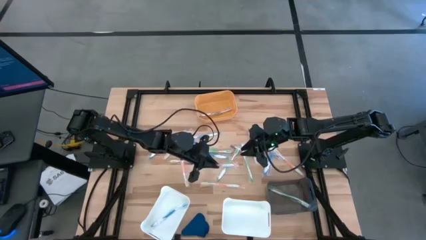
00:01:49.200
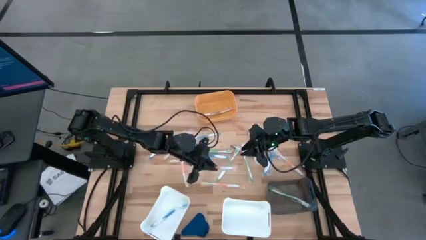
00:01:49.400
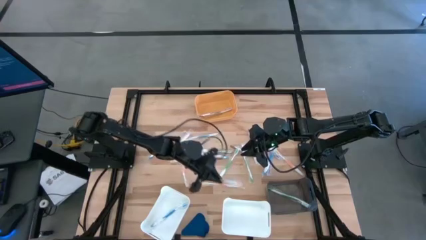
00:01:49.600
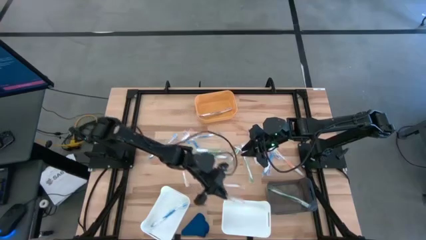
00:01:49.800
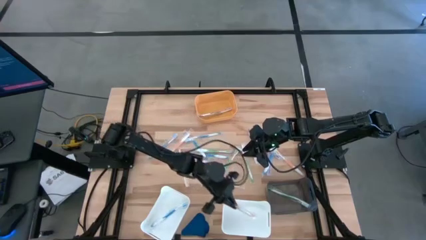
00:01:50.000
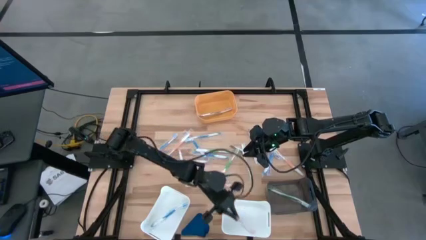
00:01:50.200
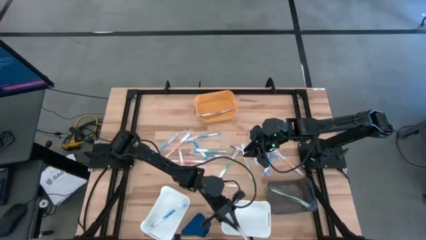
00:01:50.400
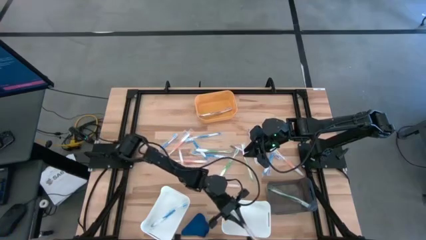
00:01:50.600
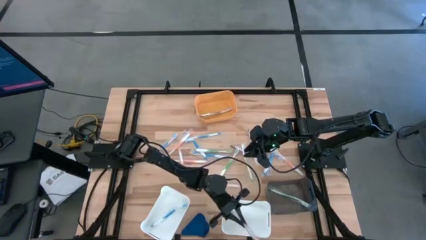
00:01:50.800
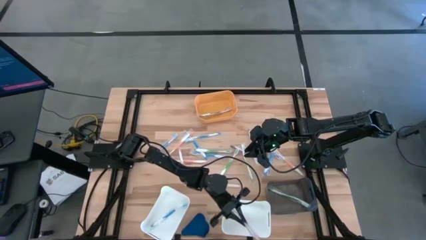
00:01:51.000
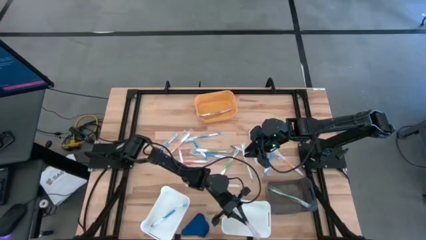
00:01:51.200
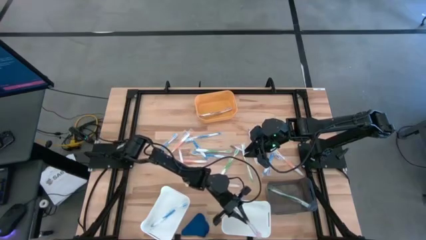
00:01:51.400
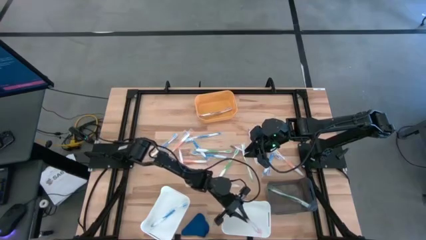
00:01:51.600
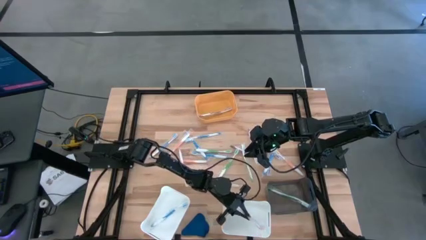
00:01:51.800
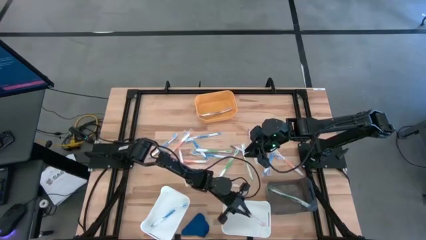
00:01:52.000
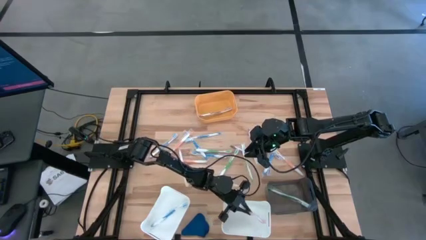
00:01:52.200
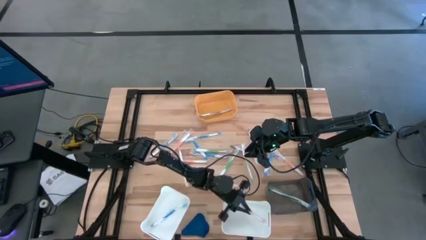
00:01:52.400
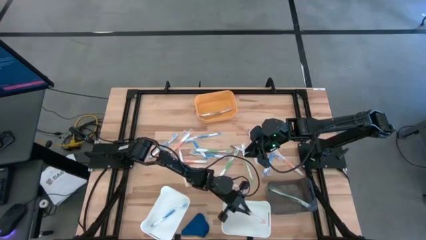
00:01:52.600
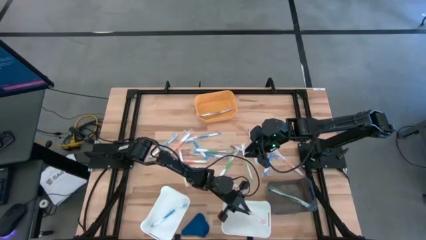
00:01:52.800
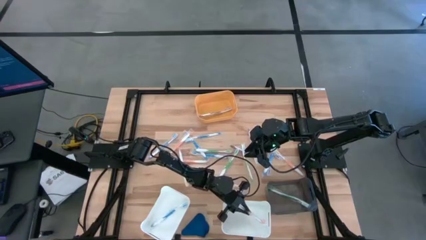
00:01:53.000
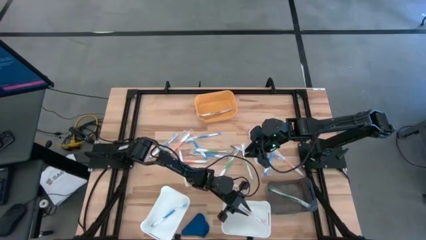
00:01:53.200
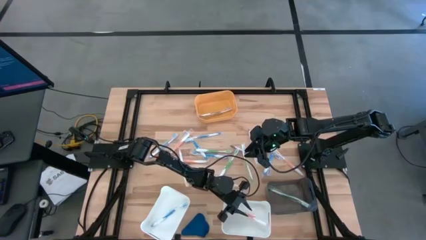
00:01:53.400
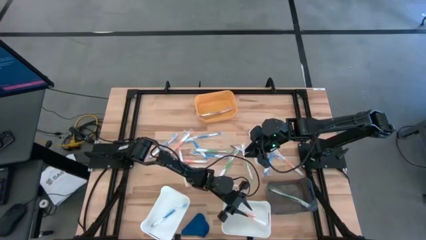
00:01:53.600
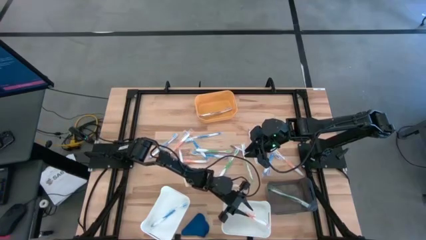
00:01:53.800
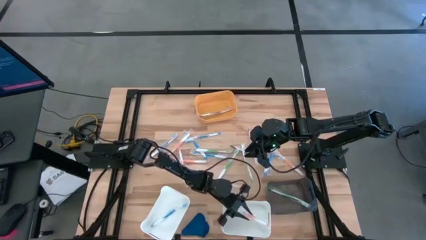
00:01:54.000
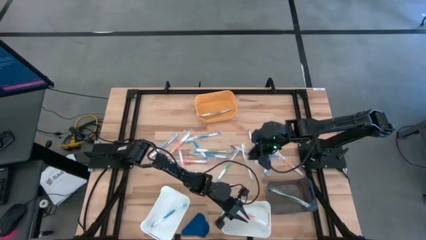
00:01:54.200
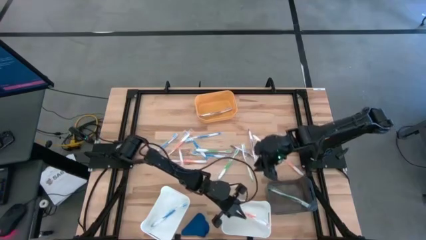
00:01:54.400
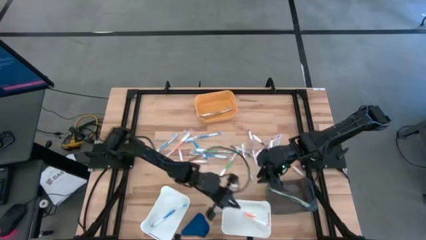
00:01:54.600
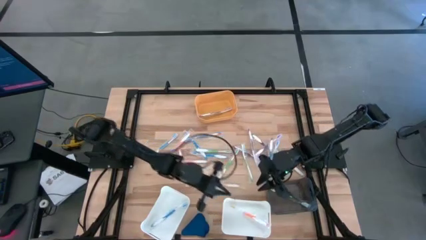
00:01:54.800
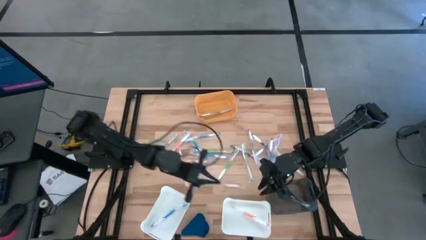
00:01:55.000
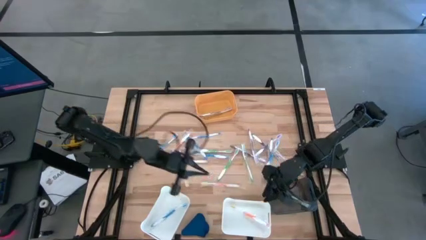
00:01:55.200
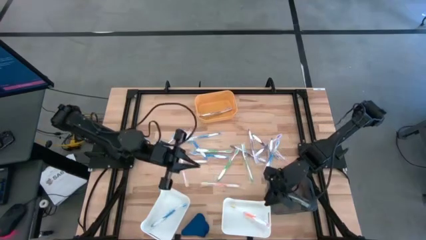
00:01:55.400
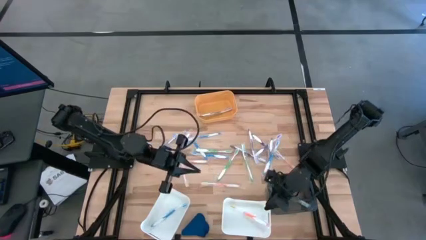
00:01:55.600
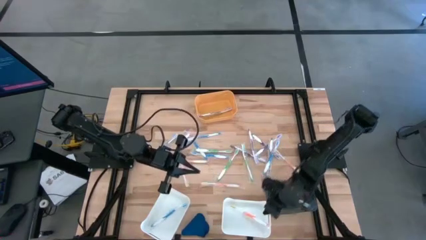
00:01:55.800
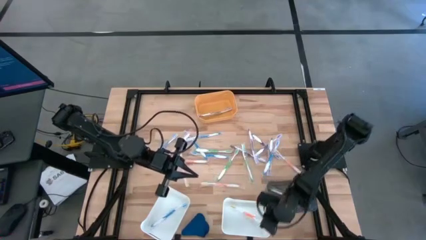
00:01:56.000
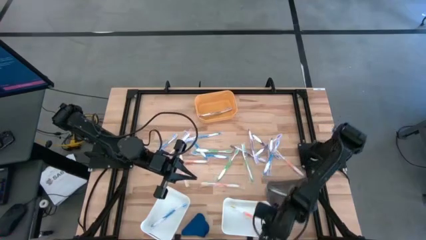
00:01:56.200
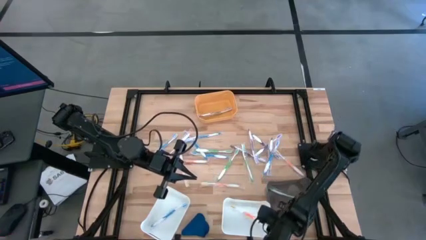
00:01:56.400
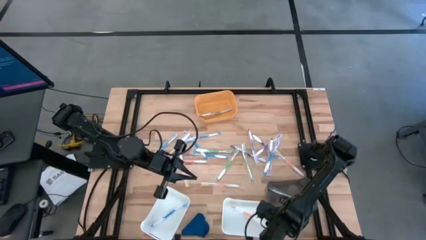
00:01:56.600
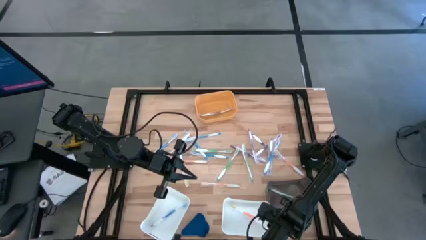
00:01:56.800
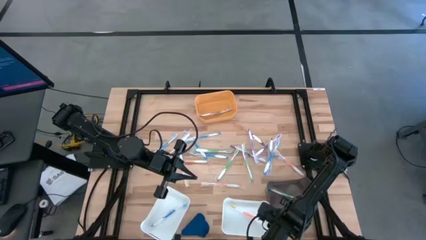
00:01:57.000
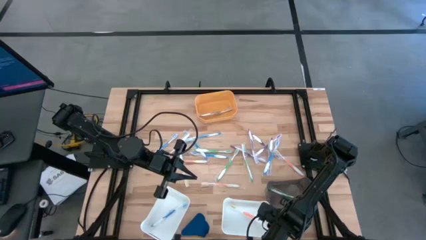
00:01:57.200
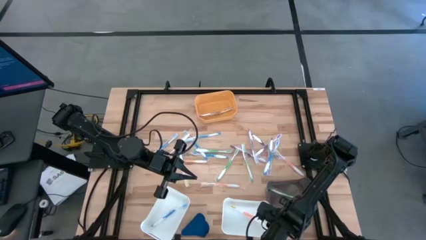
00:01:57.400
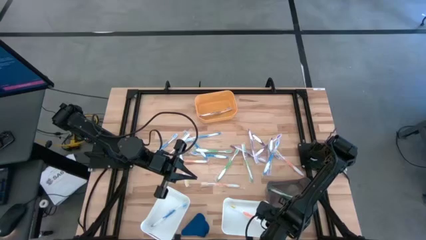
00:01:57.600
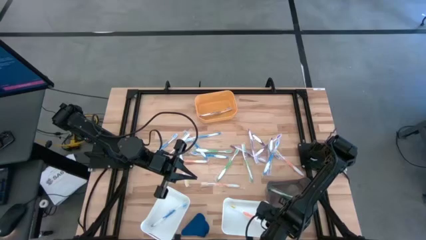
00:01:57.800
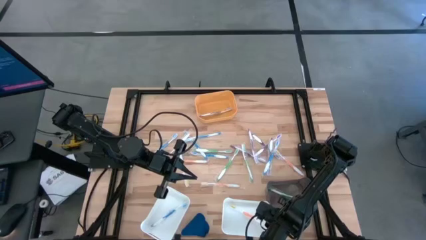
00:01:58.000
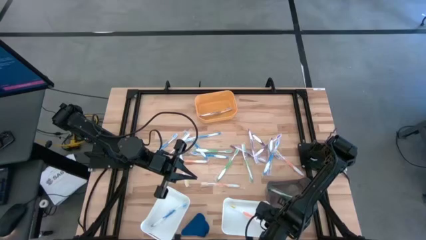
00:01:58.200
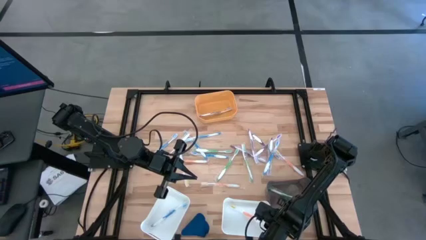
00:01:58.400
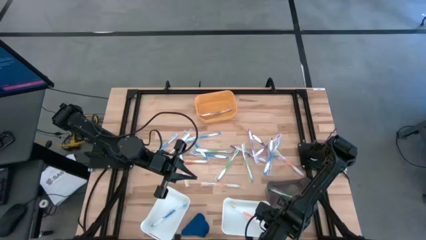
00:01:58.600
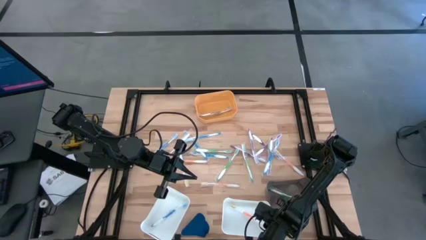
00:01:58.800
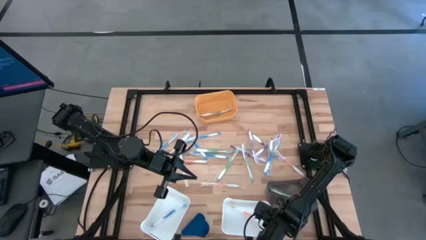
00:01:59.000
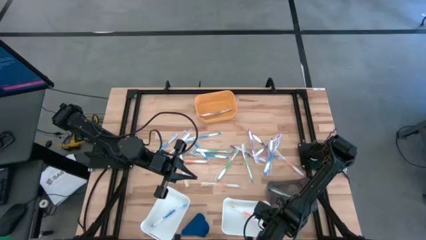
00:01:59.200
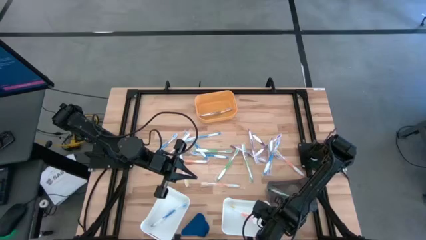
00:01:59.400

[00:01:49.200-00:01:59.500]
Task: Pick & Place Toothbrushes
Put the orange toothbrush into right white bin

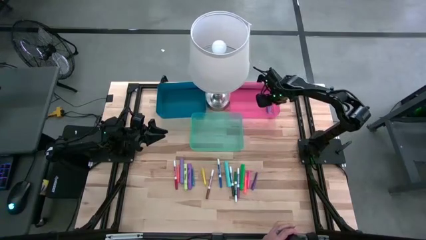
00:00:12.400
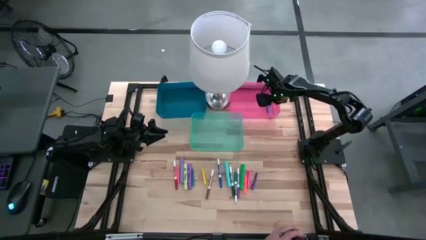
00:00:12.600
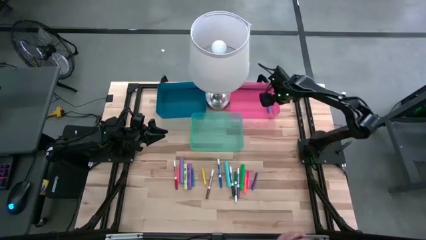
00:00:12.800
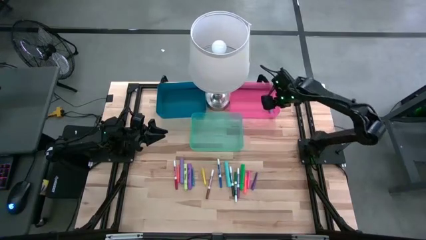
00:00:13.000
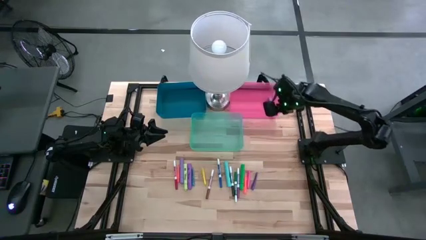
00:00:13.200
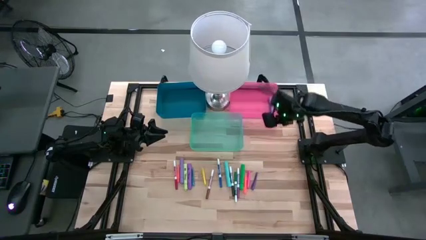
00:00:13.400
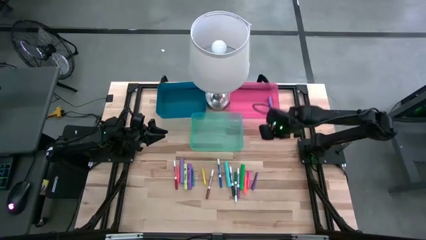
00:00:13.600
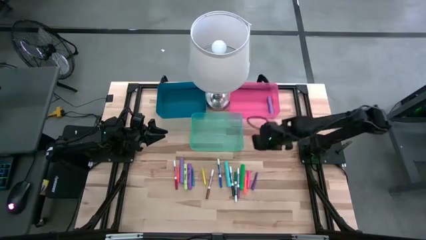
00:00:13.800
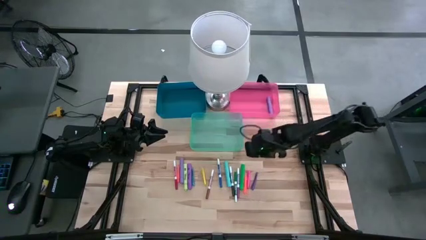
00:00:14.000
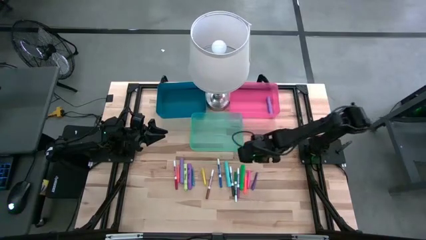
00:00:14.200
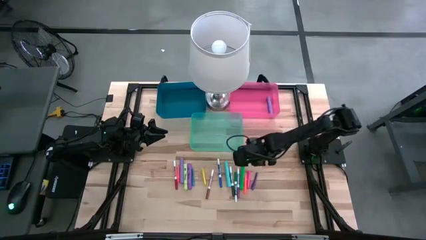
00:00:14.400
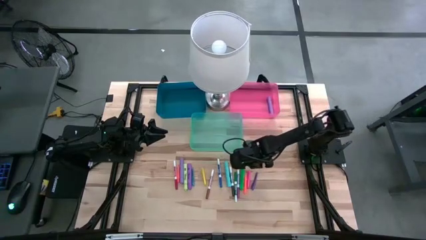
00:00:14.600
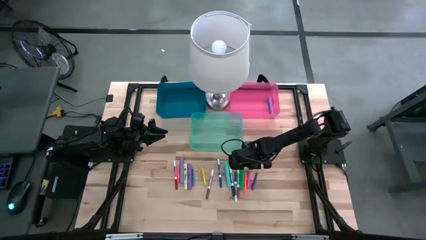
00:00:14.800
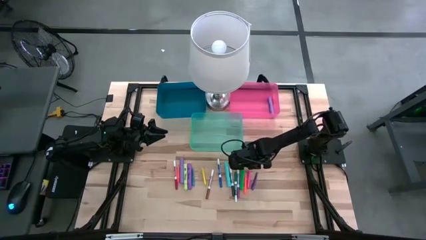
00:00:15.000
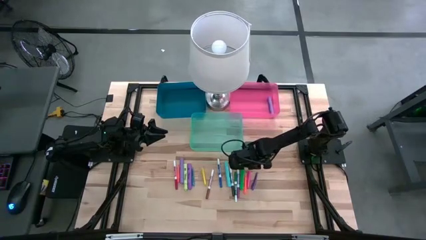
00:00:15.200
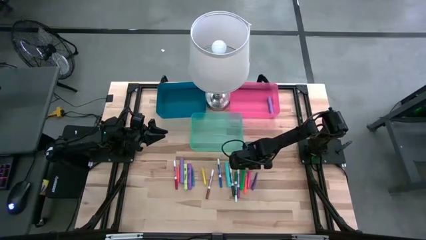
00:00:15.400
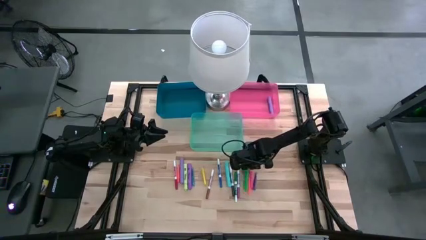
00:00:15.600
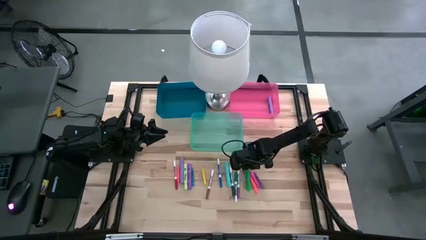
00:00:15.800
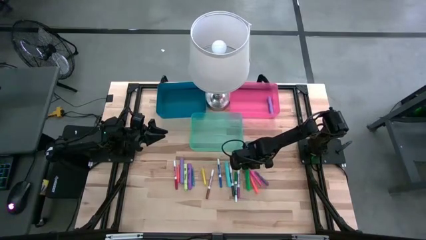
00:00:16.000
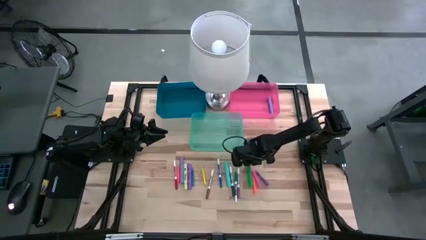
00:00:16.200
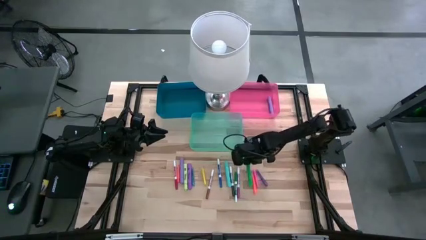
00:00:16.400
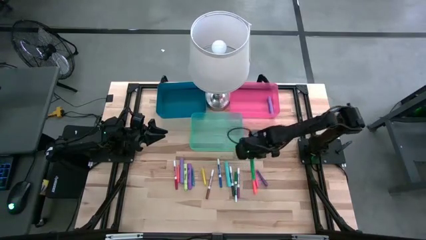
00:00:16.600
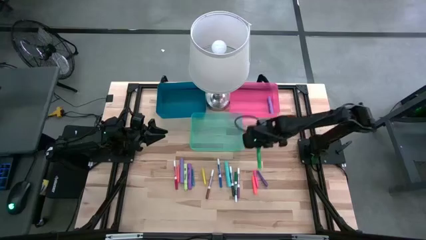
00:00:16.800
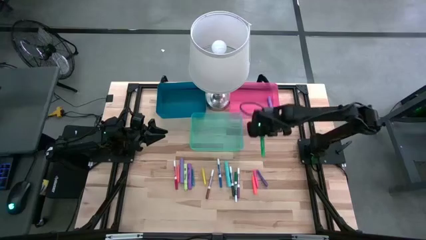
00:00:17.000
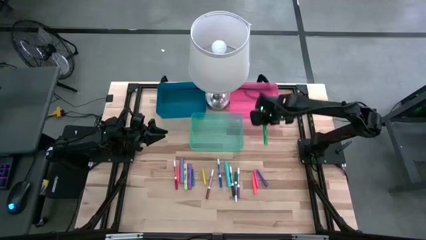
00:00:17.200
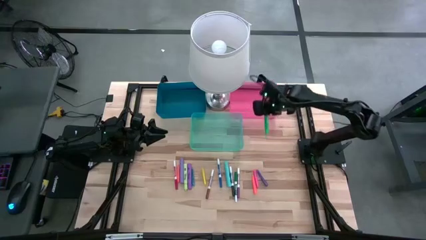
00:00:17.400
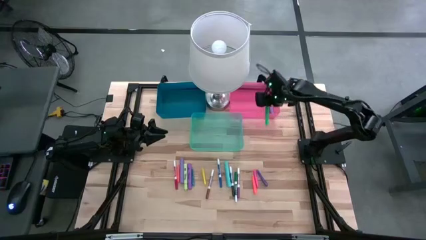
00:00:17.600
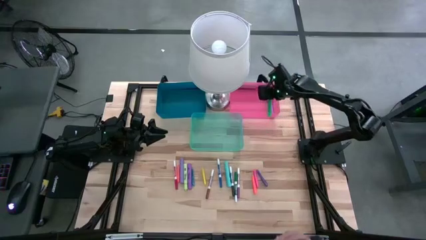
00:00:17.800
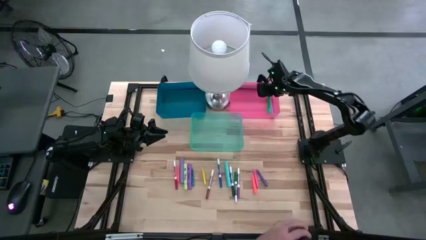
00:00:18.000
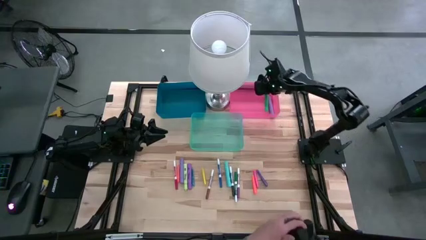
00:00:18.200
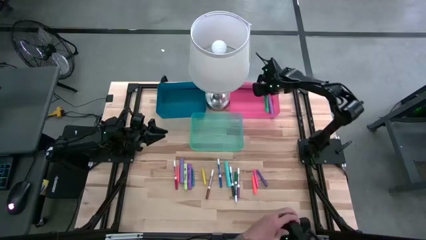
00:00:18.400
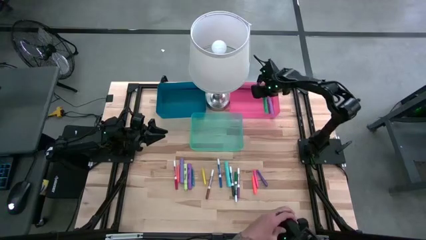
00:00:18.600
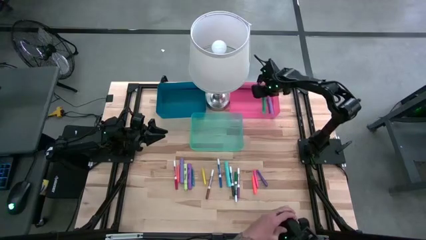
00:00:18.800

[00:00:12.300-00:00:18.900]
Task: Pick & Place Markers
Put the green highlighter pen into the red bin
